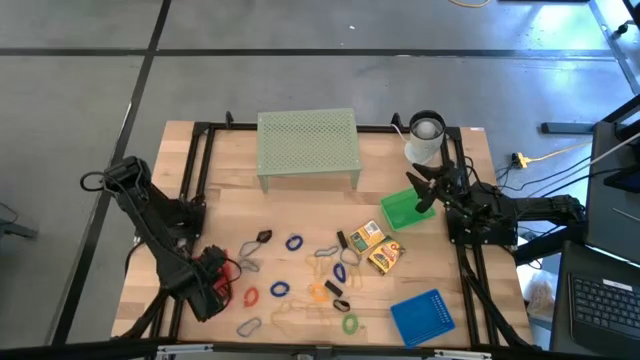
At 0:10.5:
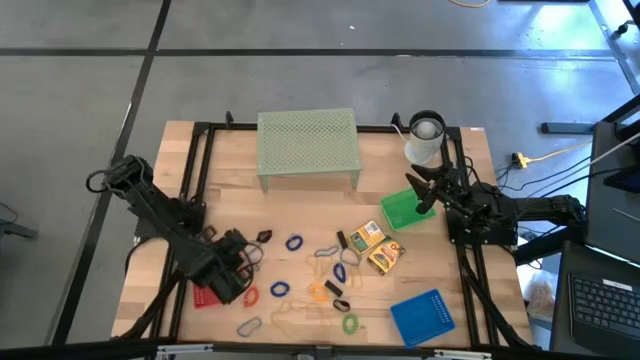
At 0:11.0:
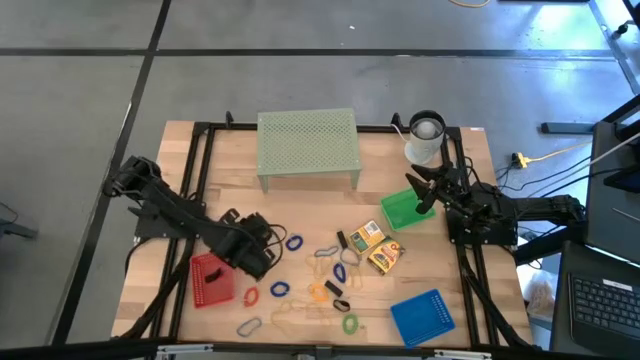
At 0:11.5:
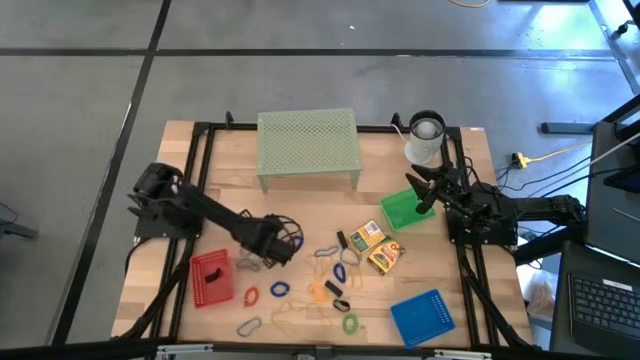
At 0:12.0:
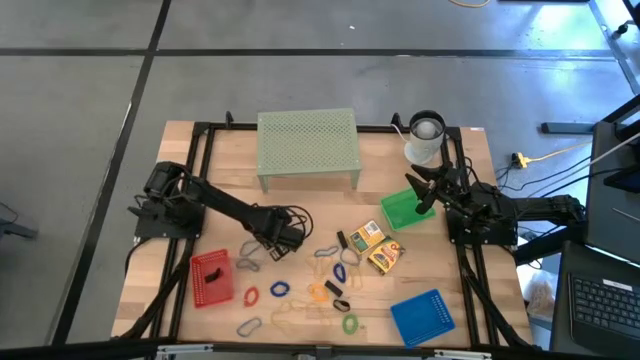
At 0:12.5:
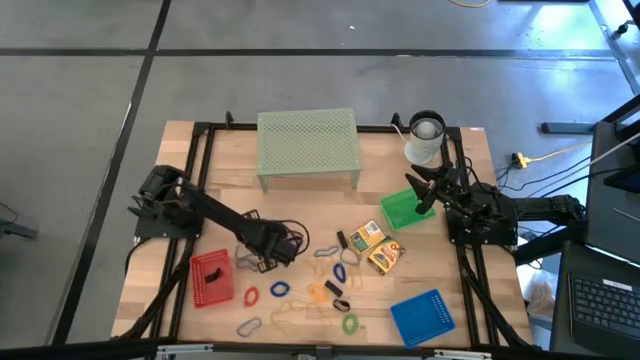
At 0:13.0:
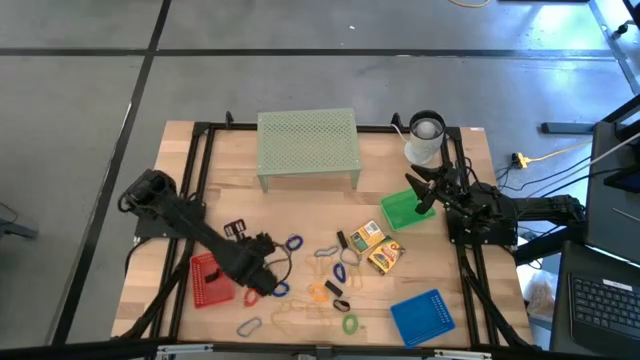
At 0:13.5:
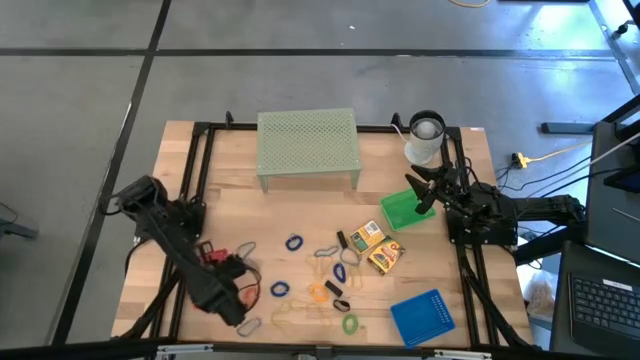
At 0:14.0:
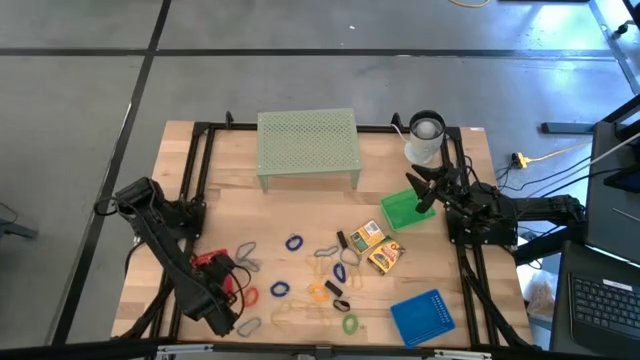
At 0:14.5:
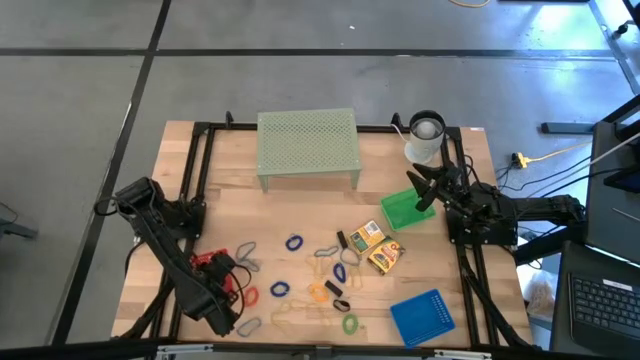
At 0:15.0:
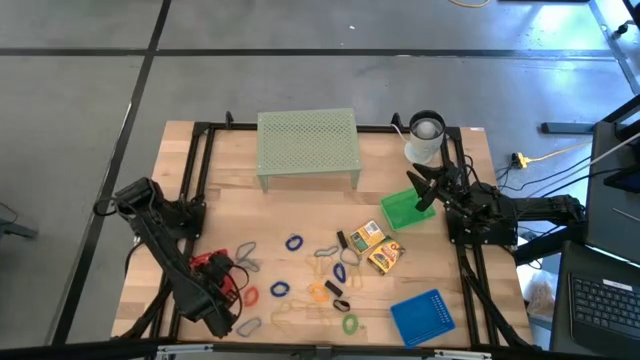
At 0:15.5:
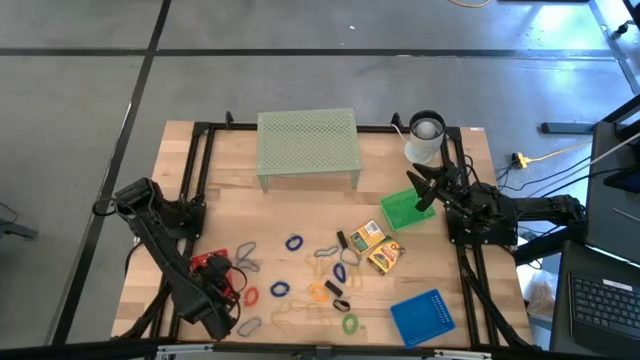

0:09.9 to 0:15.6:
Task: Pick & Place Office Desk Supplies
Put the black rubber band into the red bin

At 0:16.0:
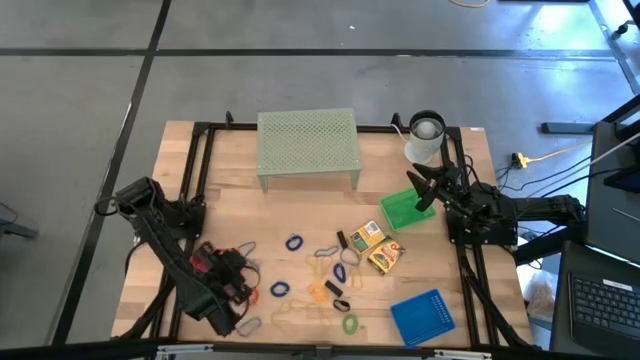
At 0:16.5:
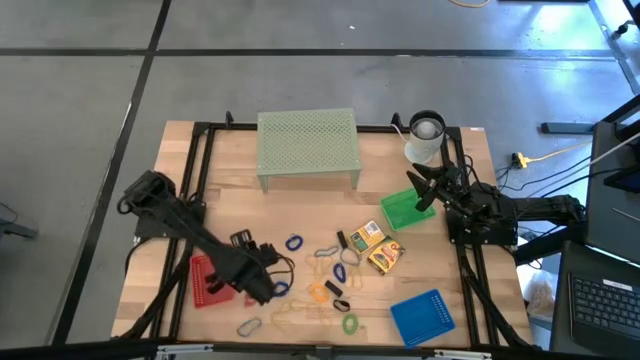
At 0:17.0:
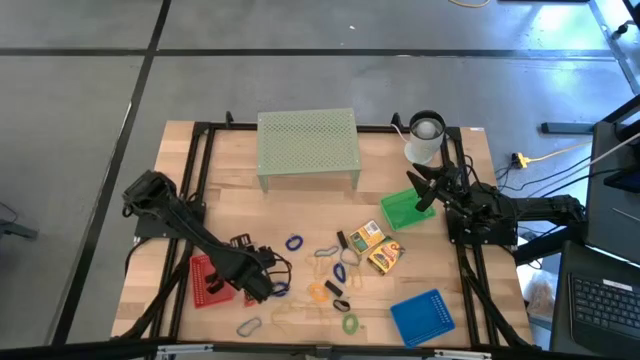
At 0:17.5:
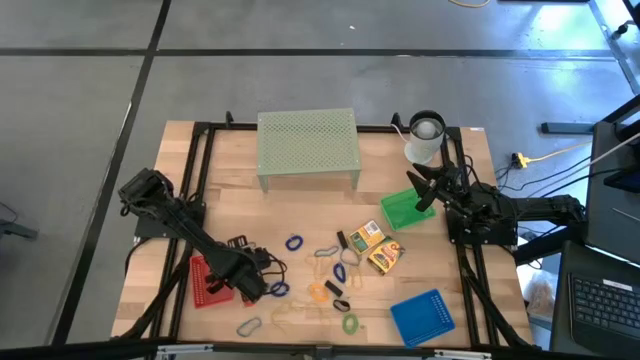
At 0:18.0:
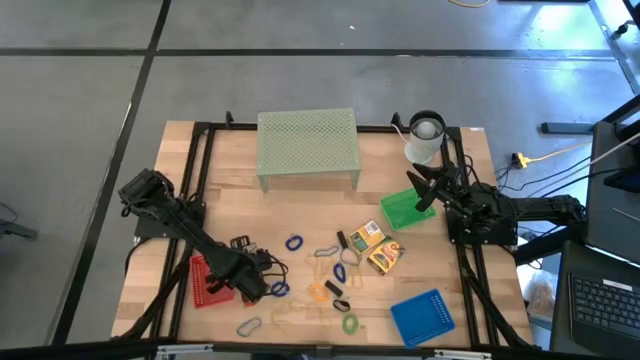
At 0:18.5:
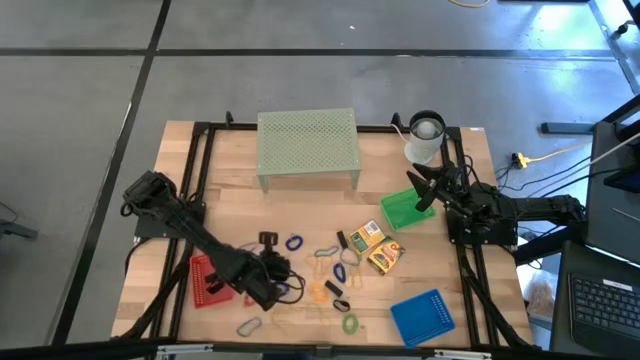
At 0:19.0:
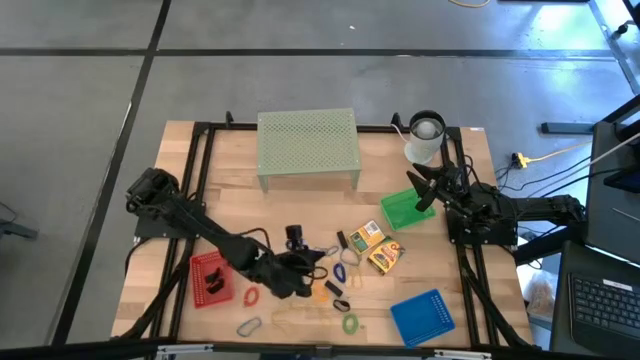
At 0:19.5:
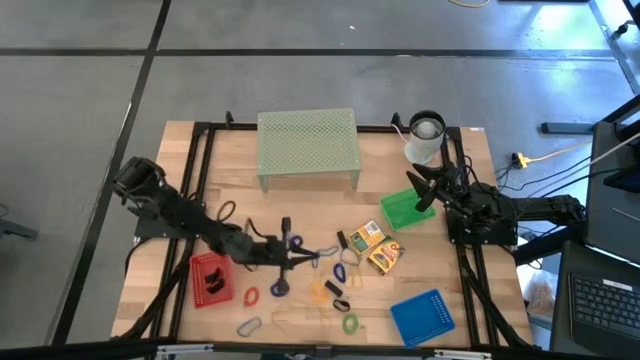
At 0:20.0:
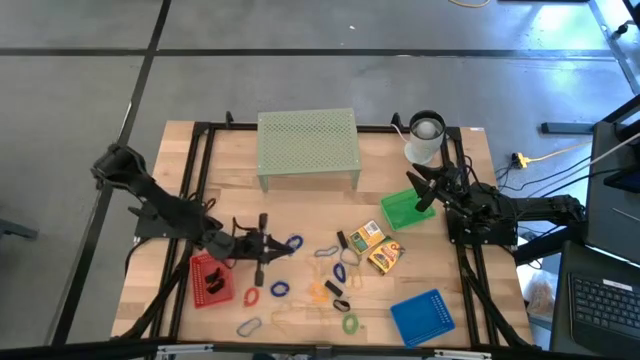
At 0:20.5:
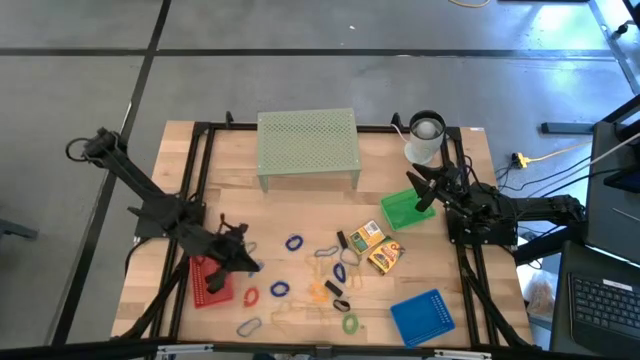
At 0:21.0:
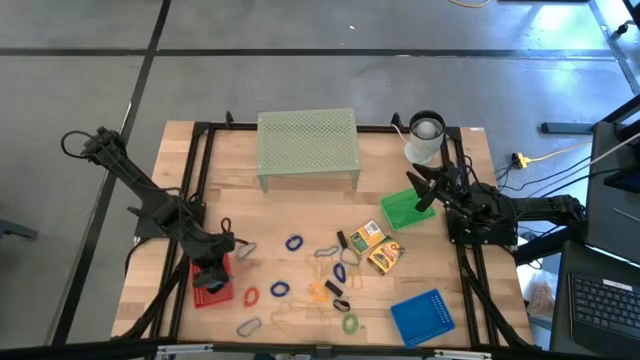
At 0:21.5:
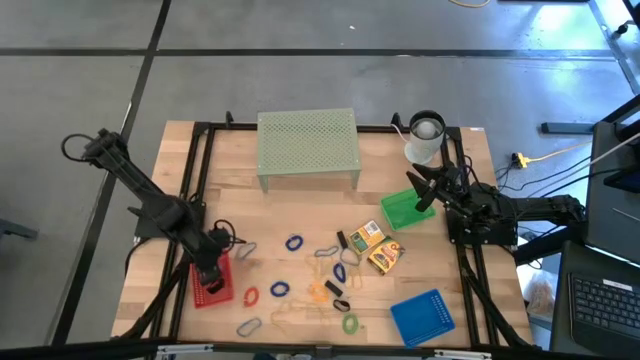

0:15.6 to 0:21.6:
Put the blue rubber band into the red bin

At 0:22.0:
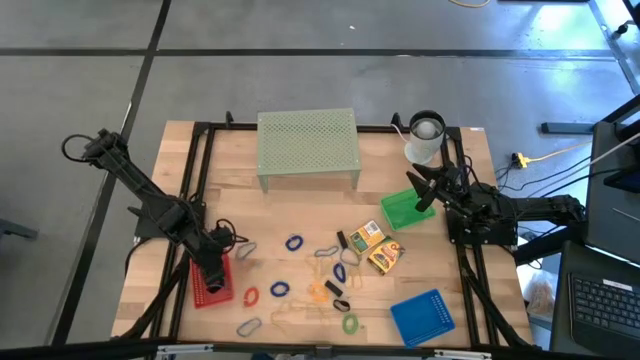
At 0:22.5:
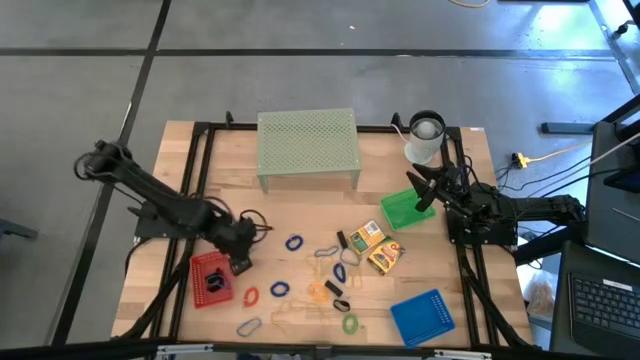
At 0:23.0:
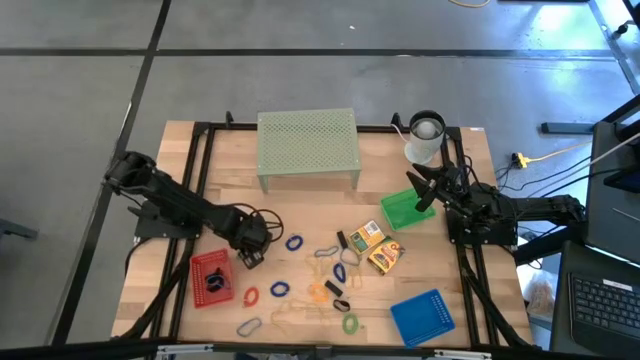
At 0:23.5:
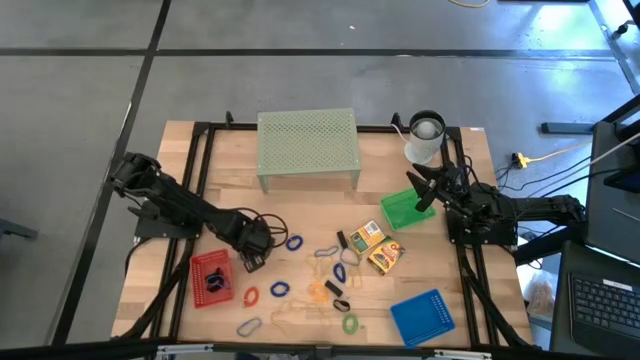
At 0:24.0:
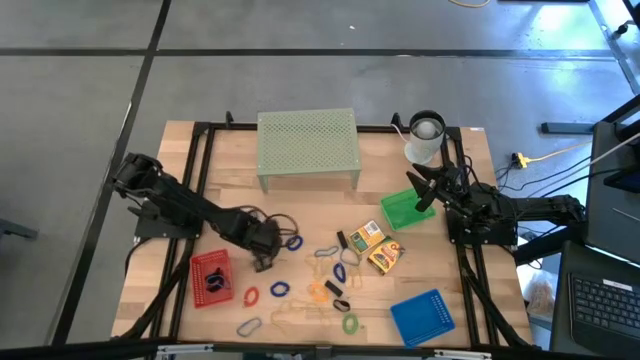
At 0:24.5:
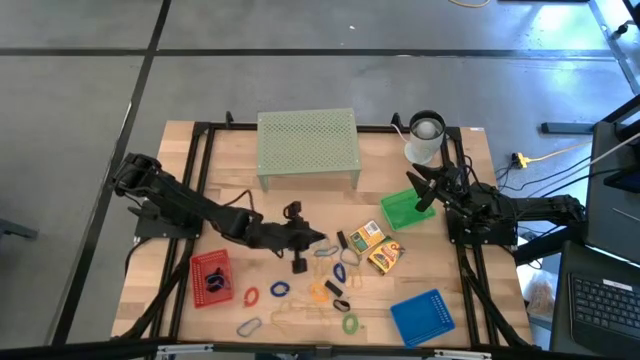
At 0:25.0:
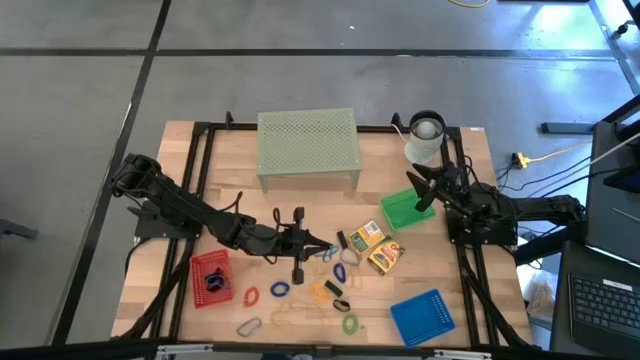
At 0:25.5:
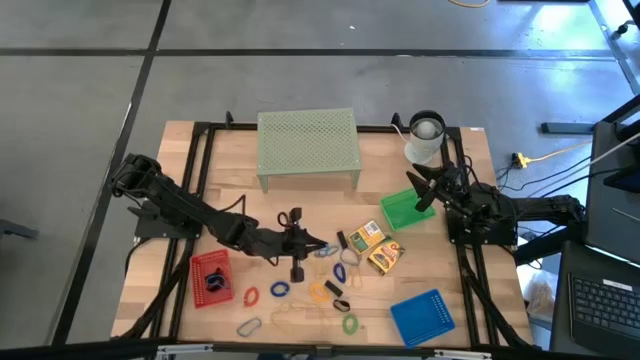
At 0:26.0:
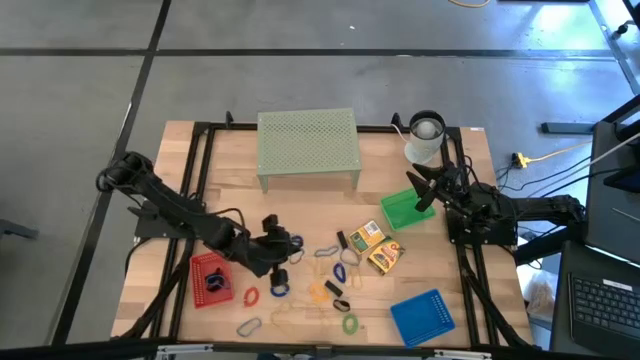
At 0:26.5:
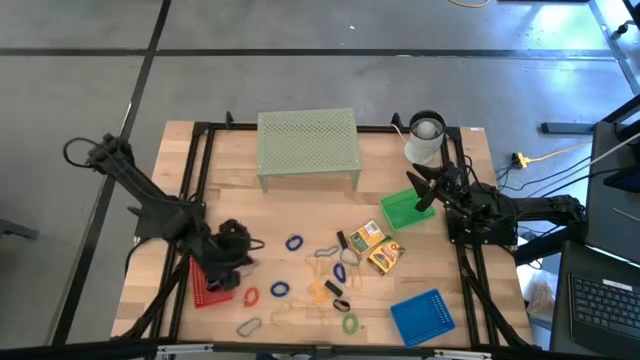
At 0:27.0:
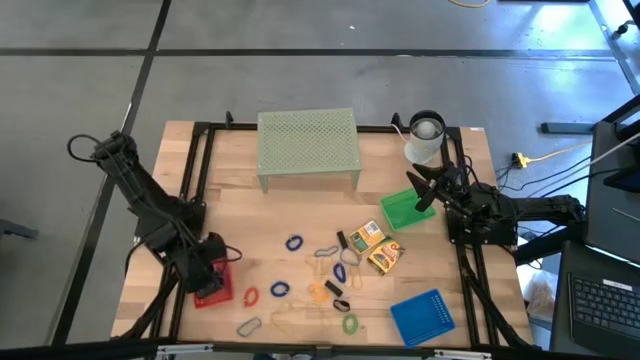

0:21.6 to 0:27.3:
Put the blue rubber band into the red bin

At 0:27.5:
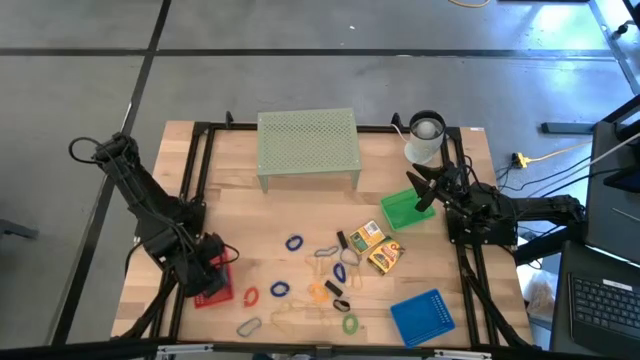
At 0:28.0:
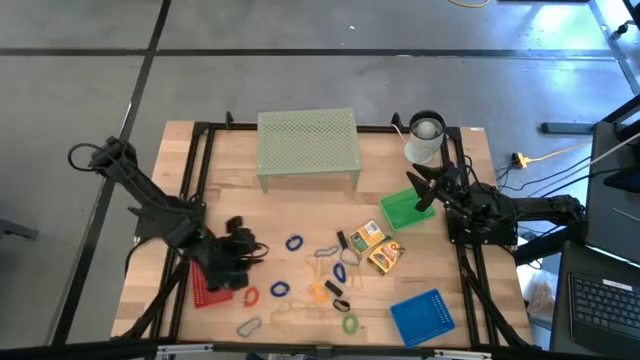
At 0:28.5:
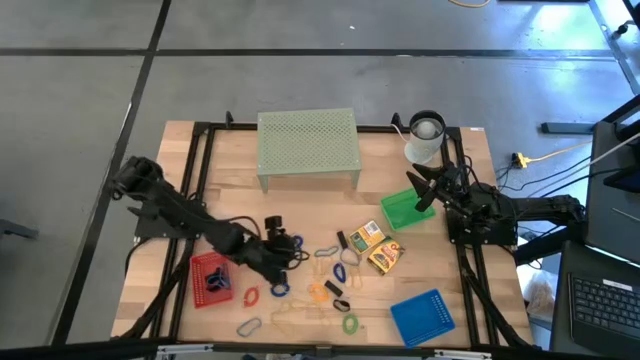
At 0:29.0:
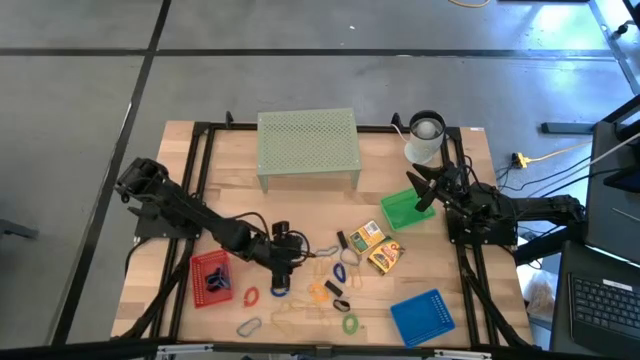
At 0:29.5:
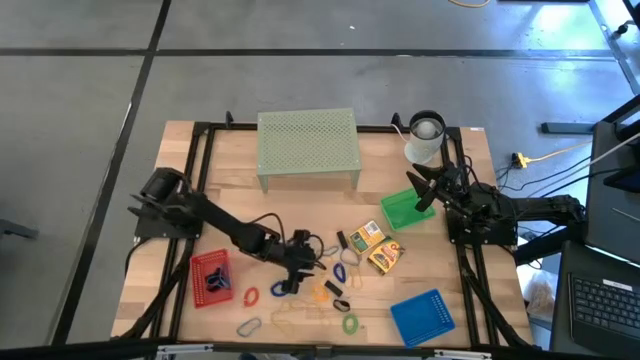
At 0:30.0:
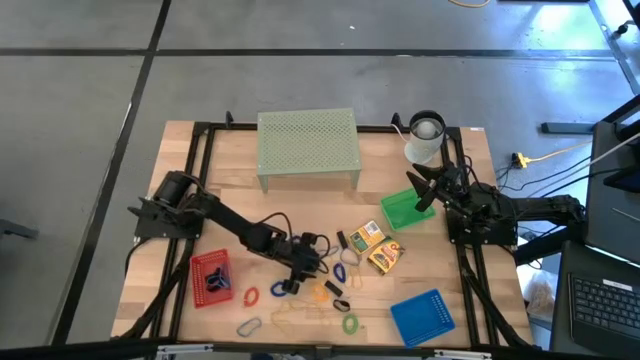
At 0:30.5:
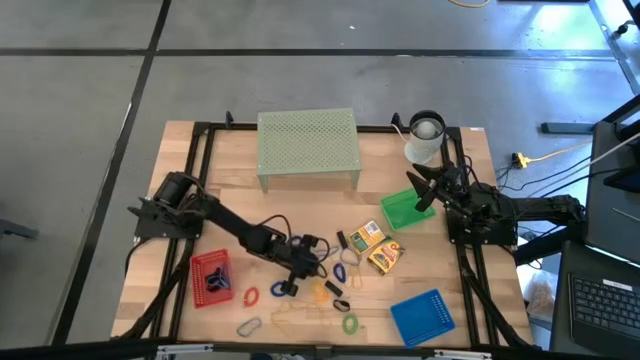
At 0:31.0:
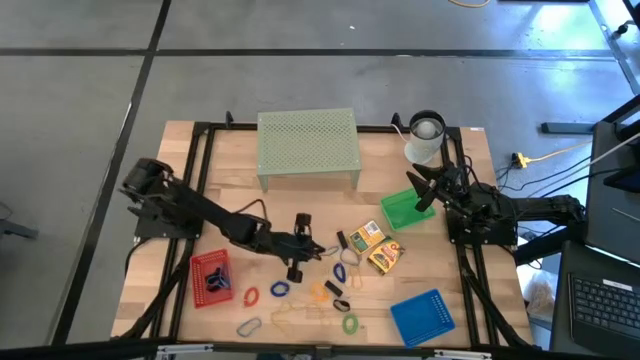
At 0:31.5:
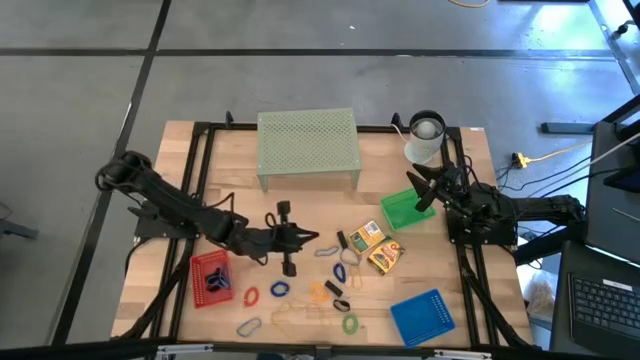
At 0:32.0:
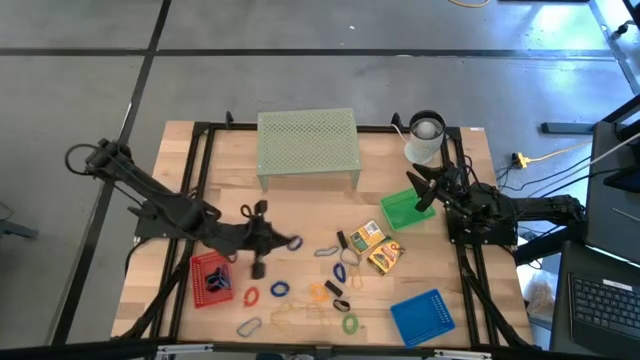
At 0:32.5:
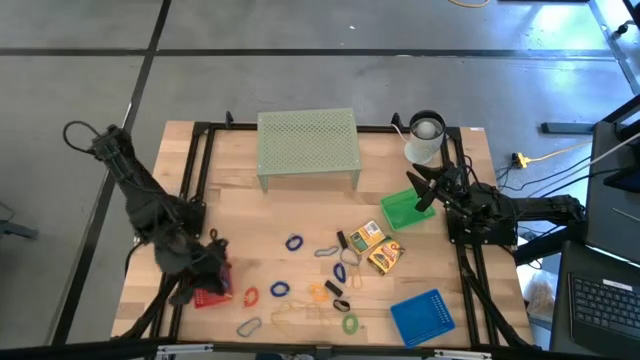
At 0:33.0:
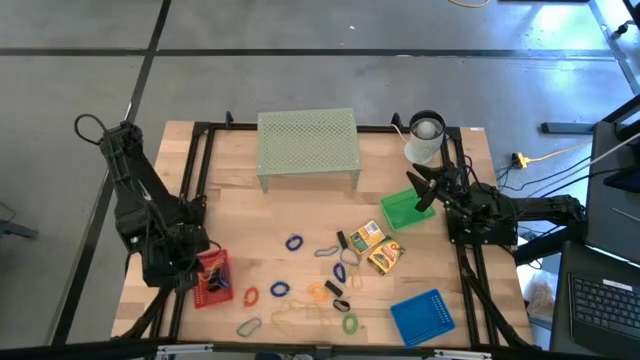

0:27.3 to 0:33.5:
Put the yellow rubber band into the red bin
